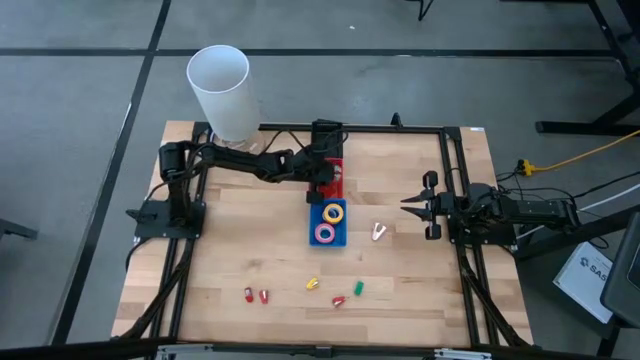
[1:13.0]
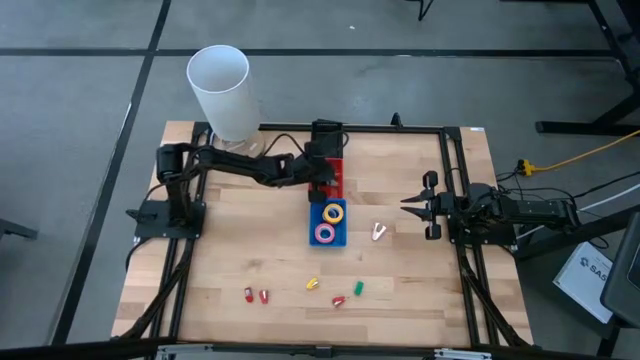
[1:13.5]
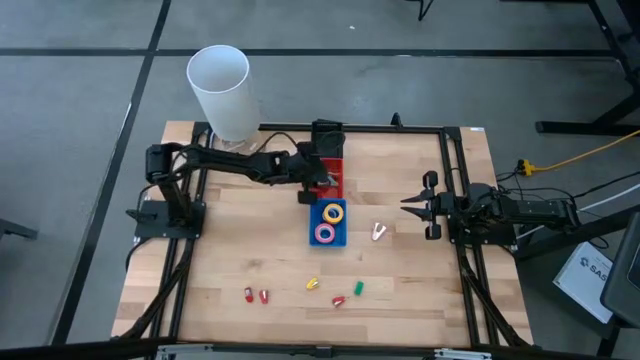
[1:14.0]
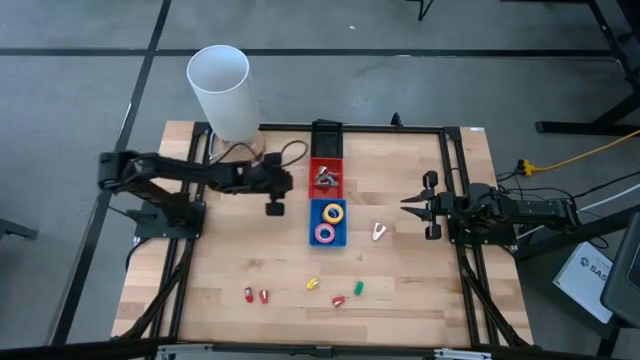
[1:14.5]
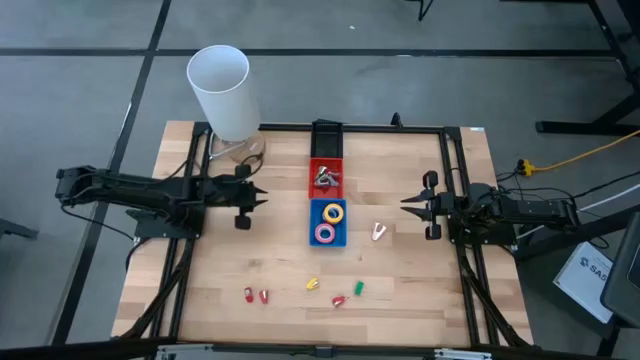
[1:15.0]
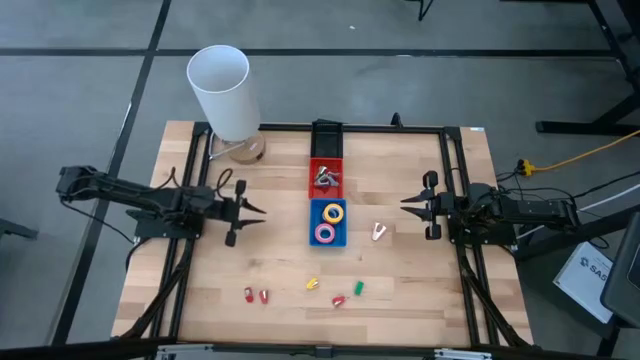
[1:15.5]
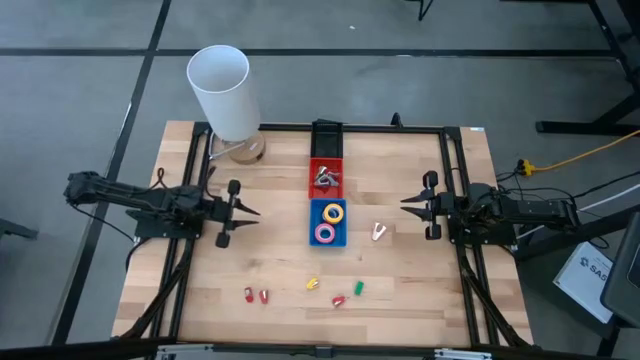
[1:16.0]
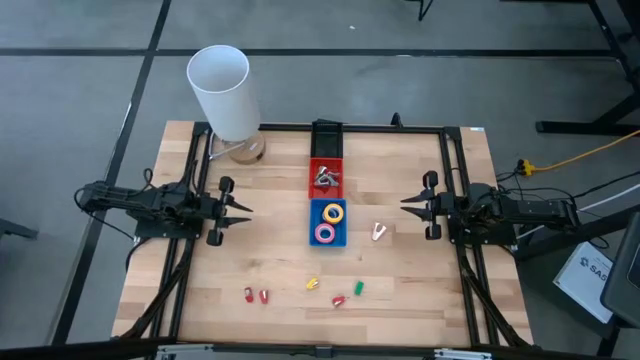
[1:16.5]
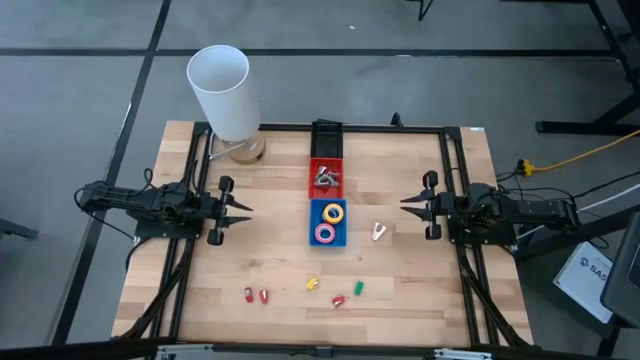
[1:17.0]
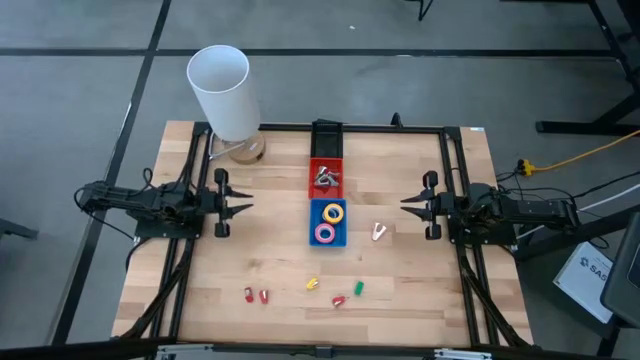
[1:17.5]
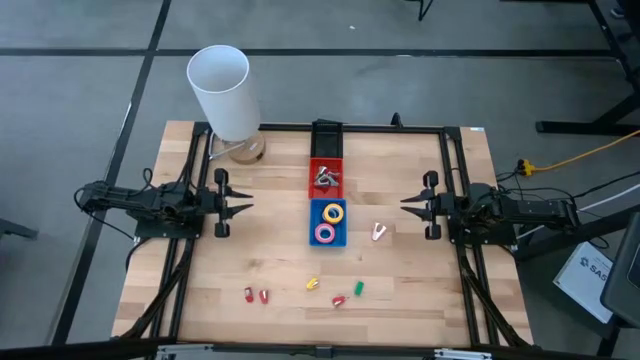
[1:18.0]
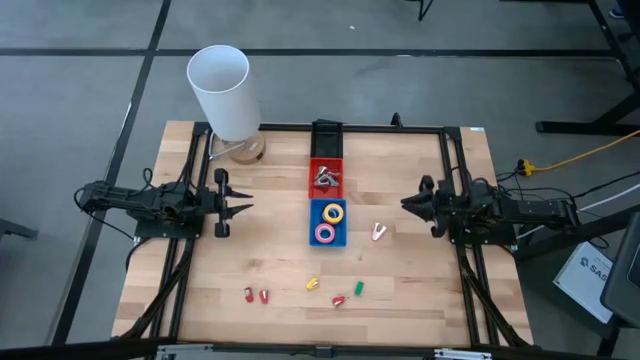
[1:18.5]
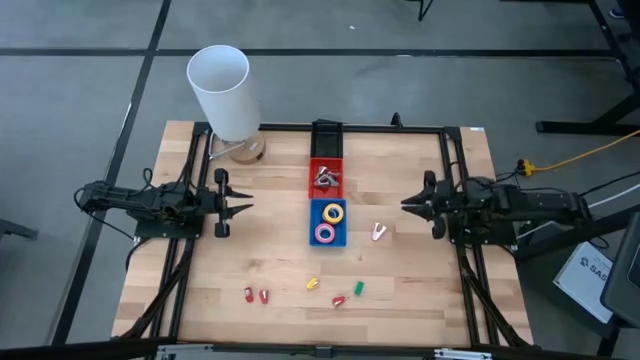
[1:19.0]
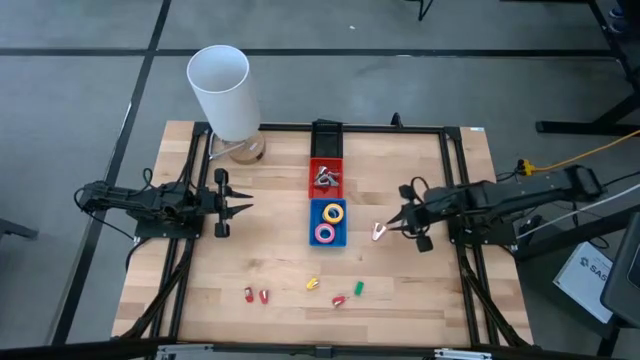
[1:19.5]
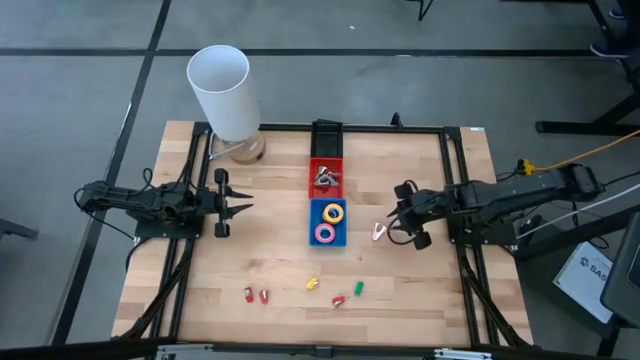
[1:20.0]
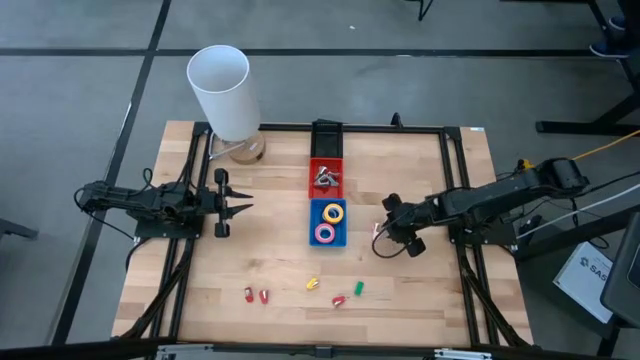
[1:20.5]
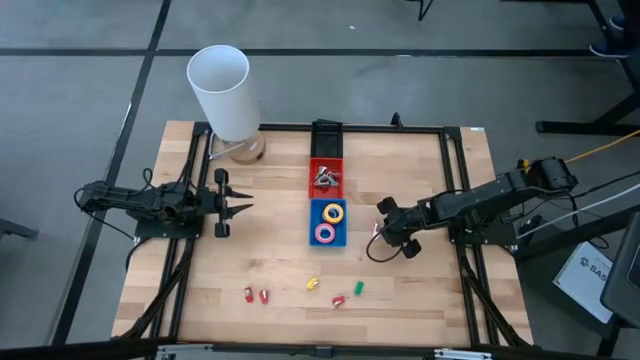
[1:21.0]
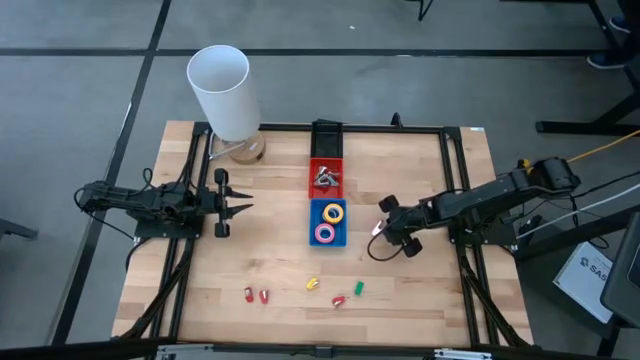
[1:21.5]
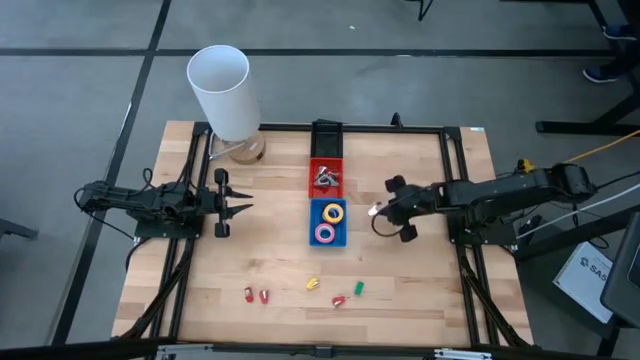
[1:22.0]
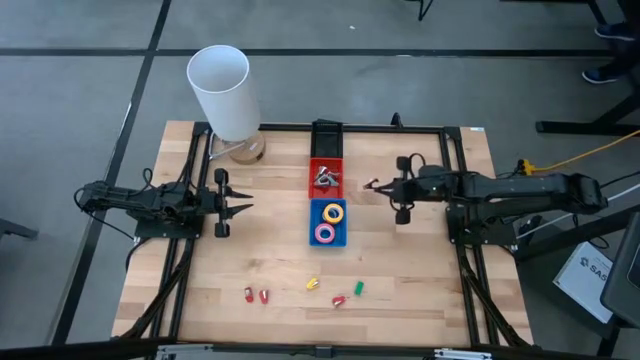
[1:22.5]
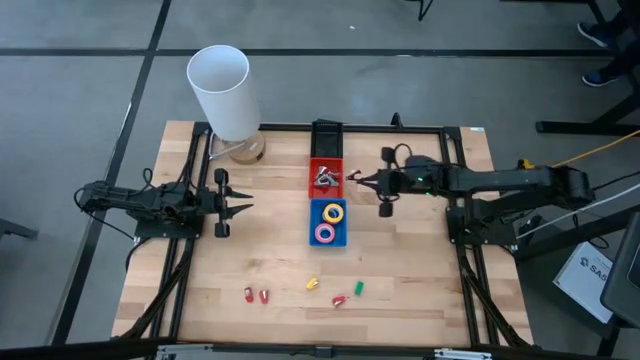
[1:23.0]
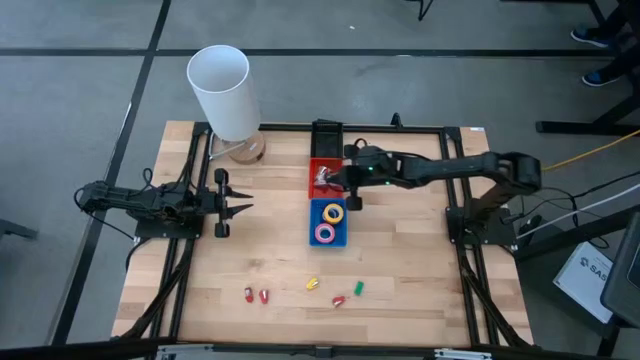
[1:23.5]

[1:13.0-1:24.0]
Task: Pick and place Stapler, Stapler remover, tape
Put the pink staple remover into the red bin

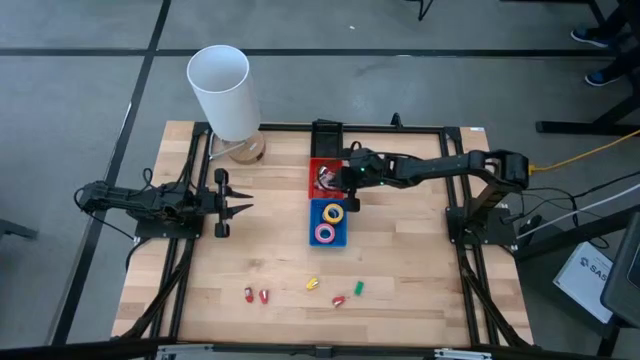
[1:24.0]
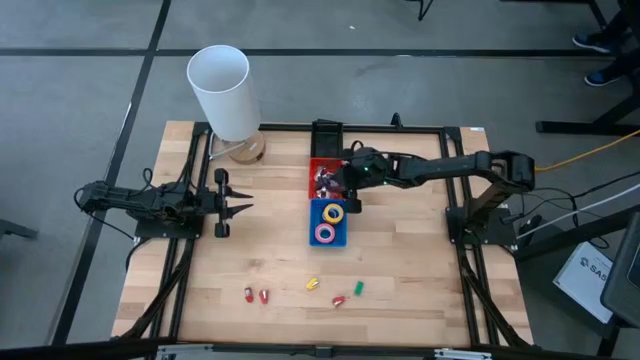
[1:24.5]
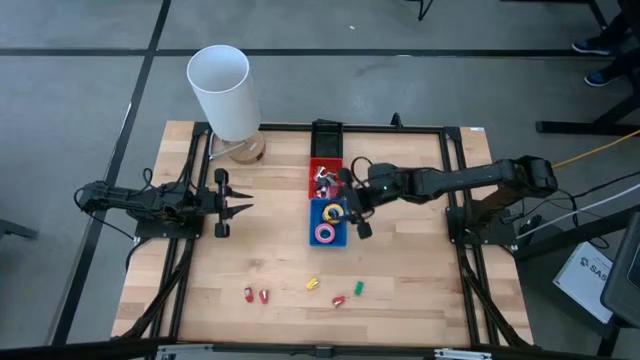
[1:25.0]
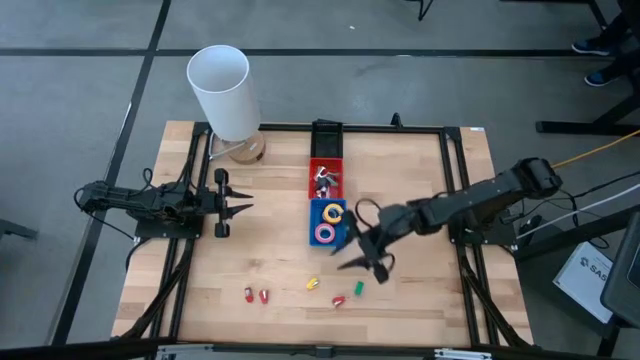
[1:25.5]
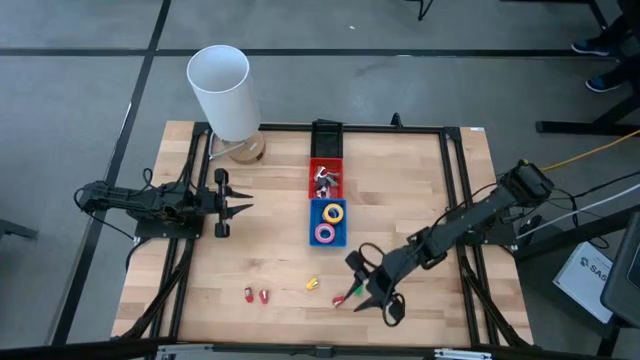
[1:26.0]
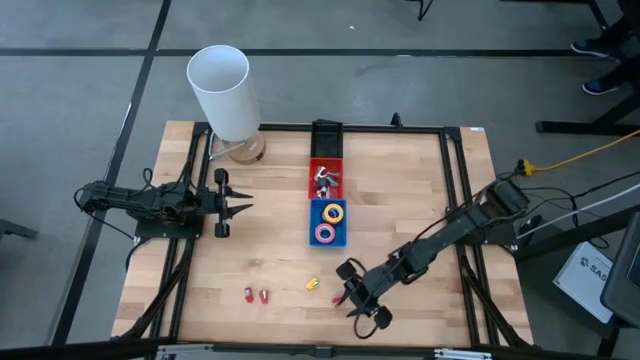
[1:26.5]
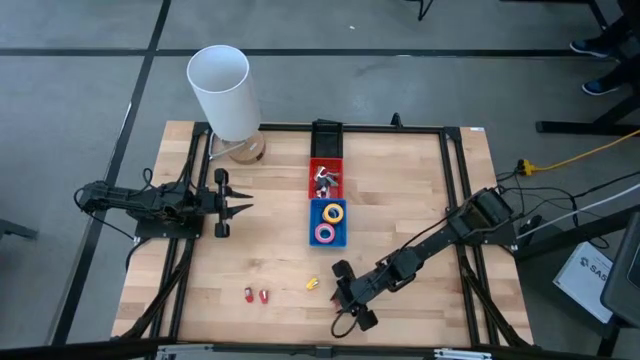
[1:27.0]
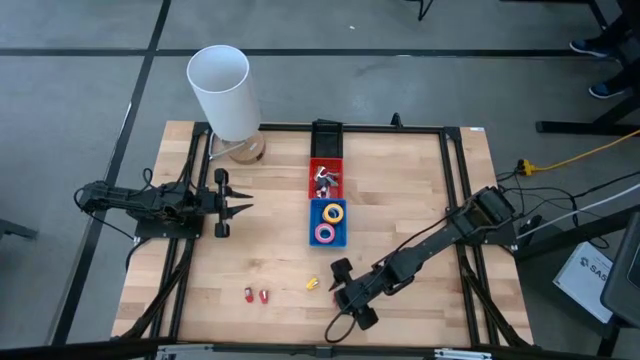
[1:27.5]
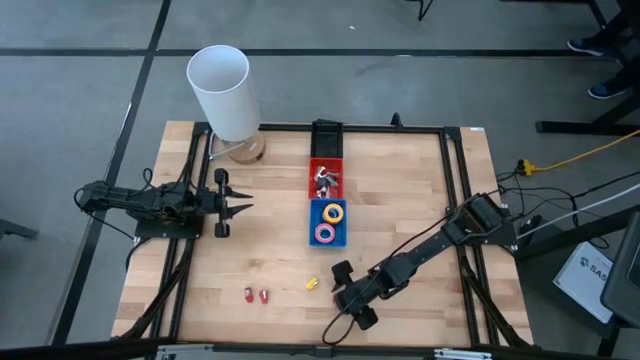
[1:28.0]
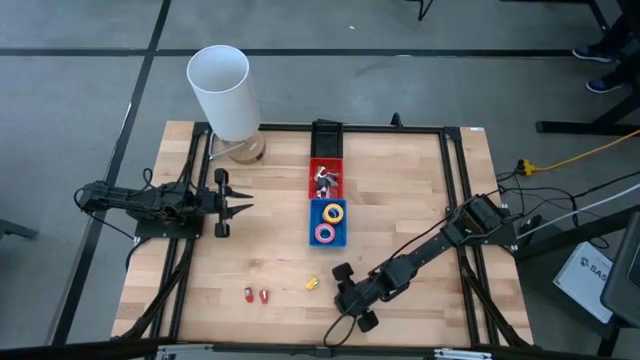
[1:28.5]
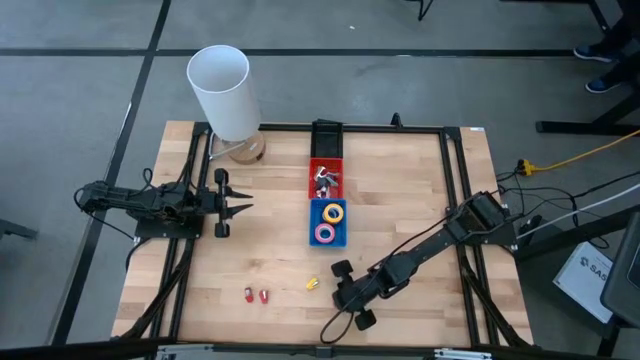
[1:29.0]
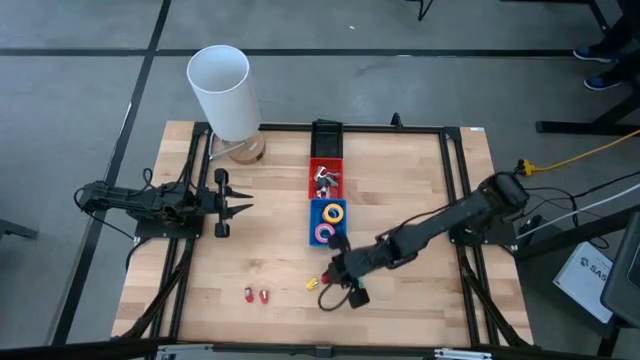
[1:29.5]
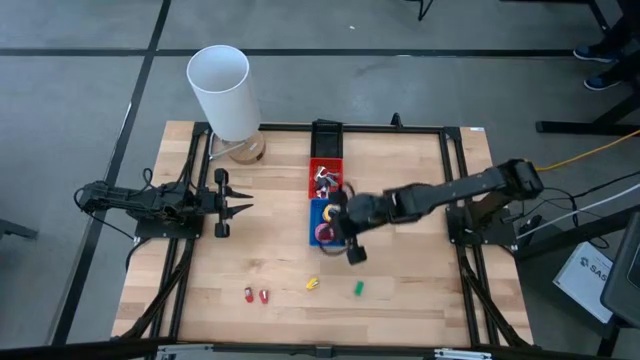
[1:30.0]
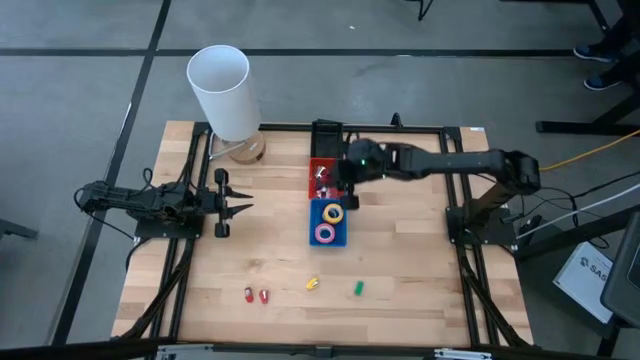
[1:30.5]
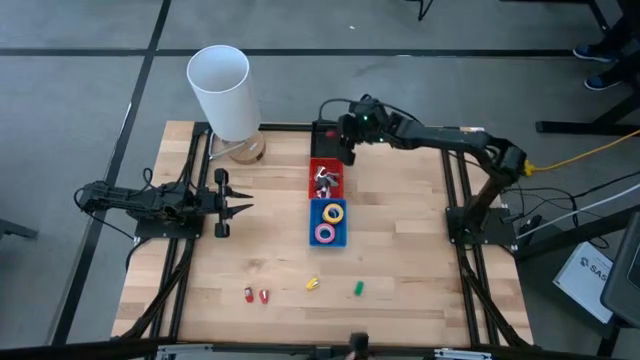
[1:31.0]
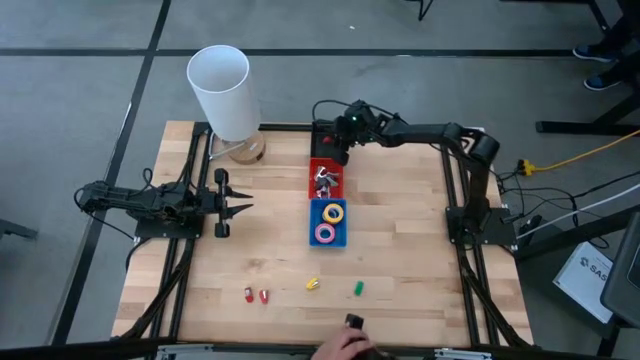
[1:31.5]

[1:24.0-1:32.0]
Put the right red stapler into the black bin

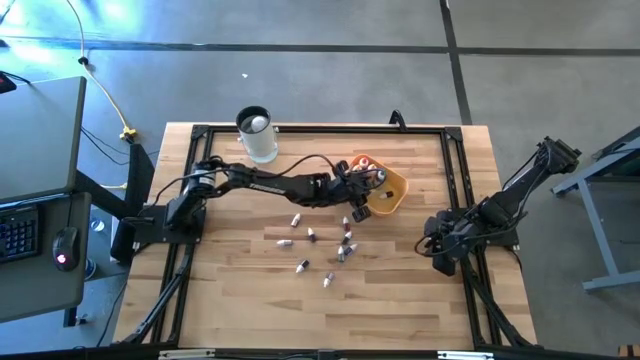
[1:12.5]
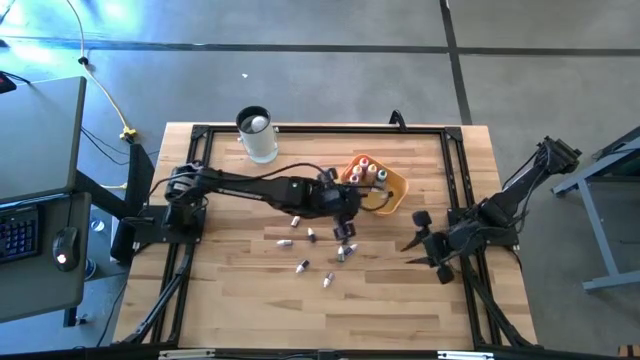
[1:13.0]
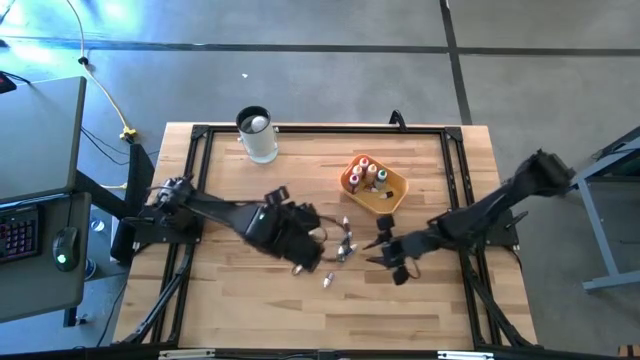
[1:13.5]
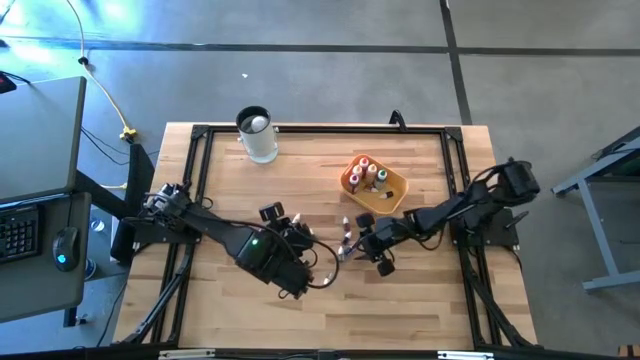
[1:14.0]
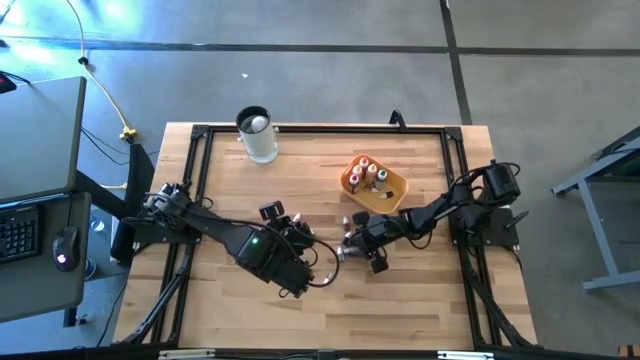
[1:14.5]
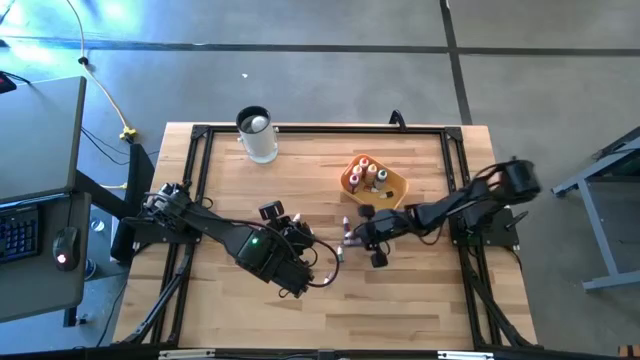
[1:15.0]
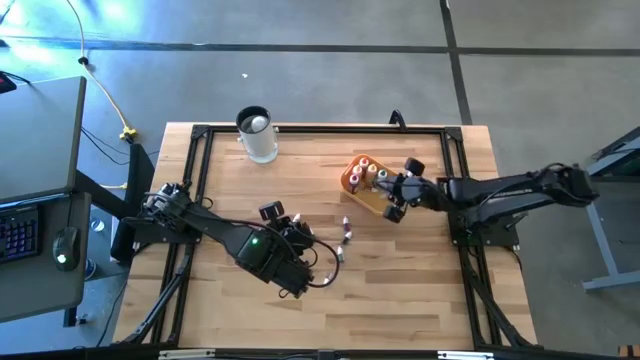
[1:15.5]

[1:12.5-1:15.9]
Task: Pick & Place food coloring
Put the small blue food coloring bottle into the yellow bin
